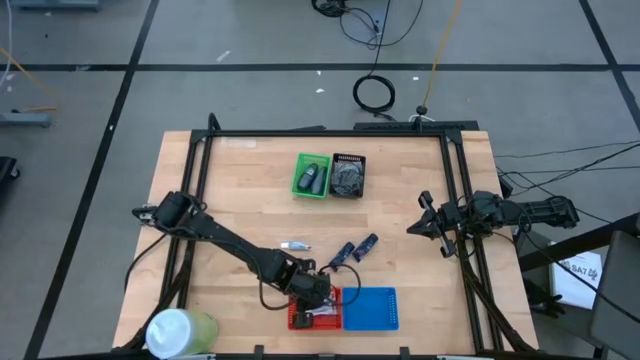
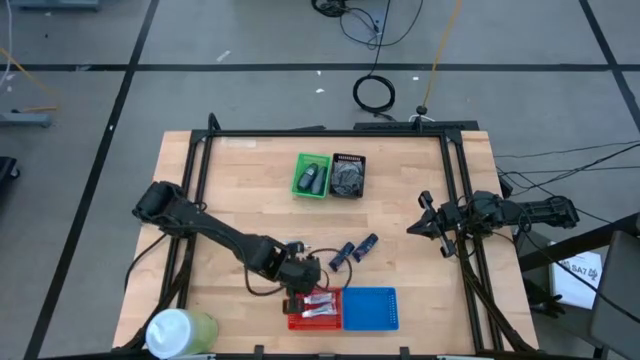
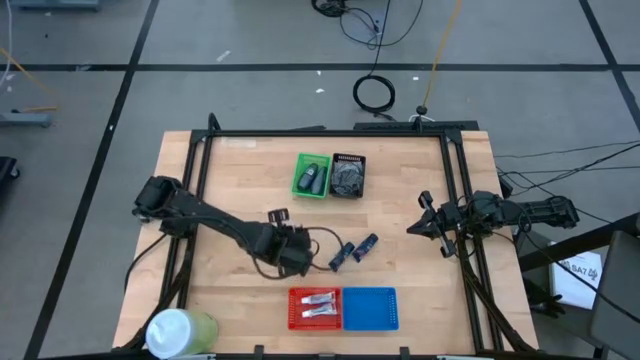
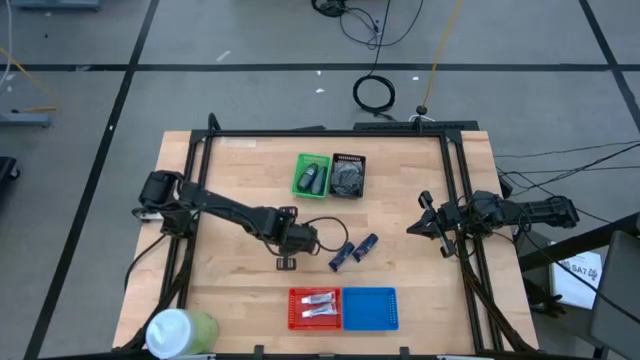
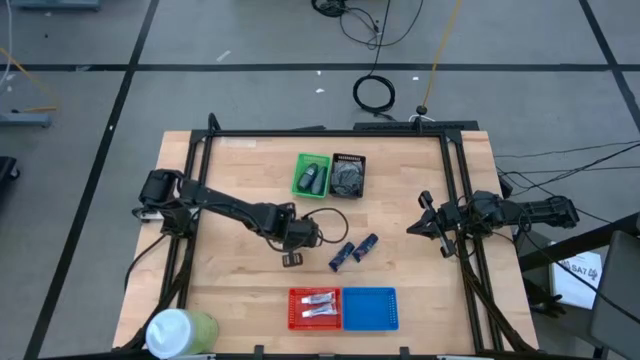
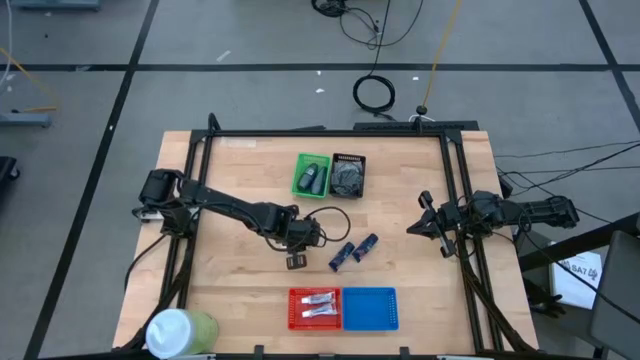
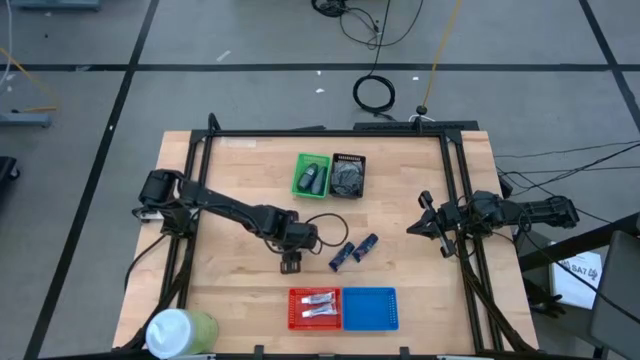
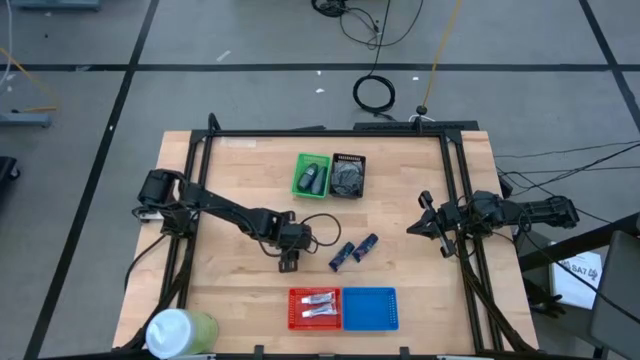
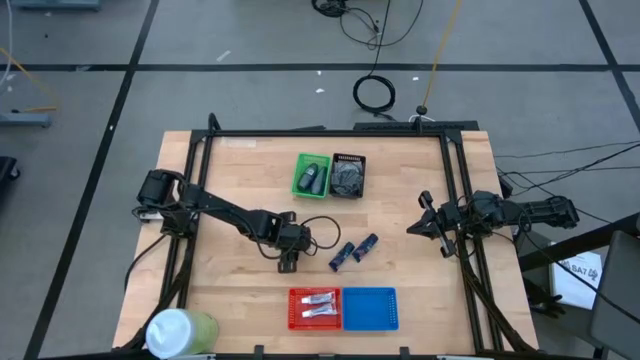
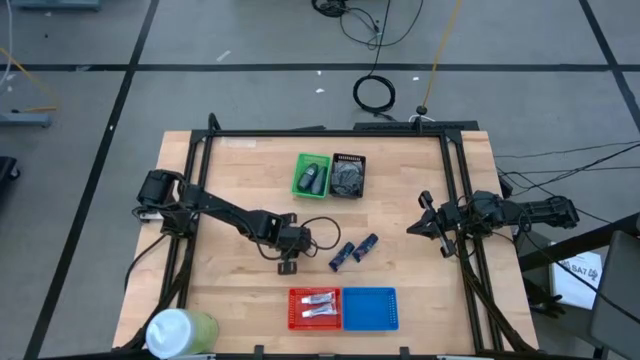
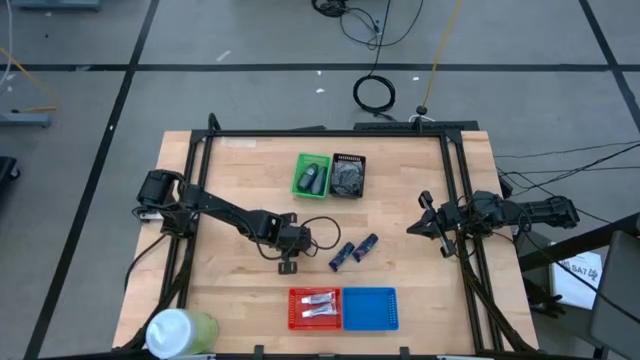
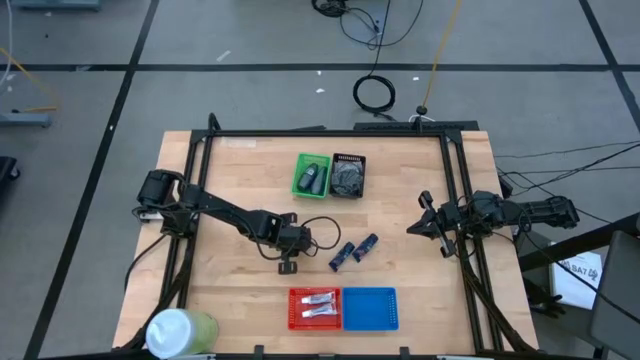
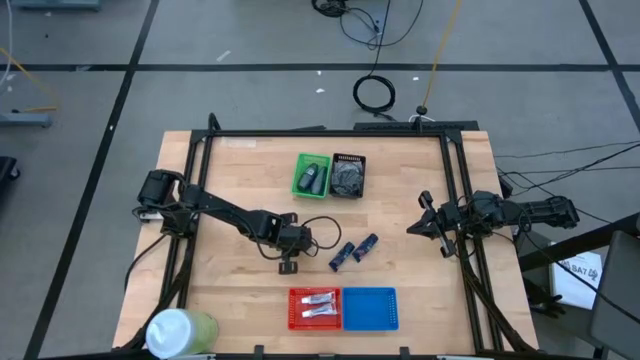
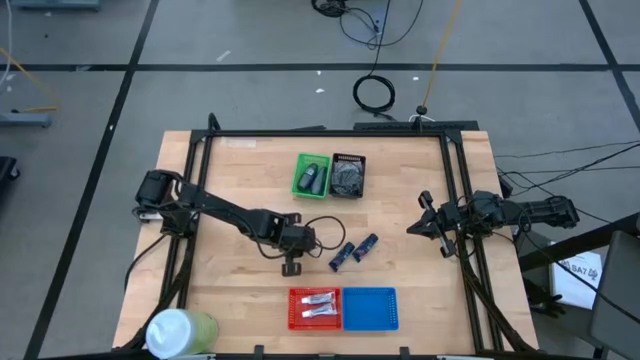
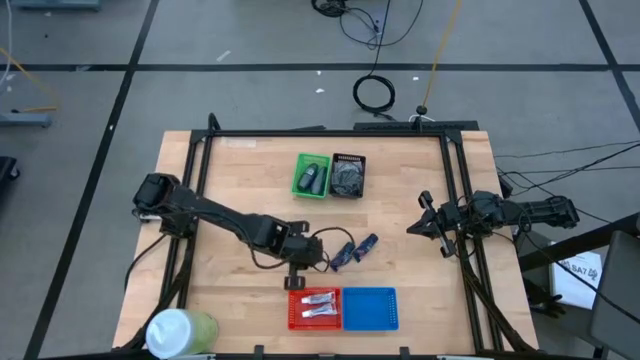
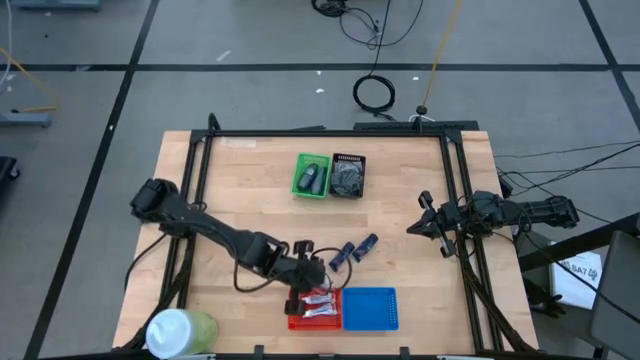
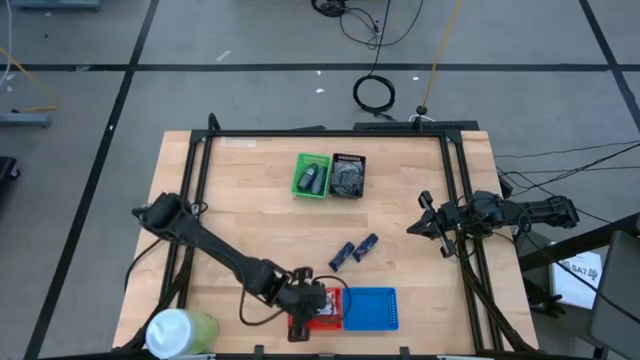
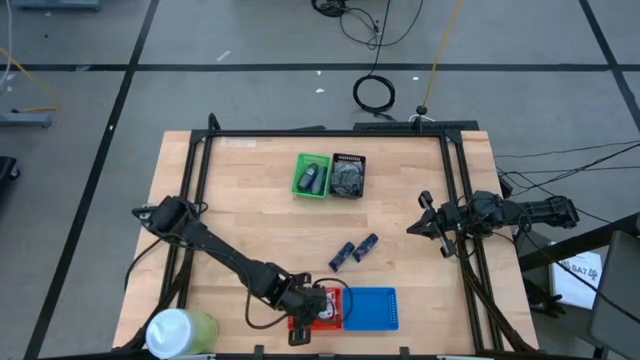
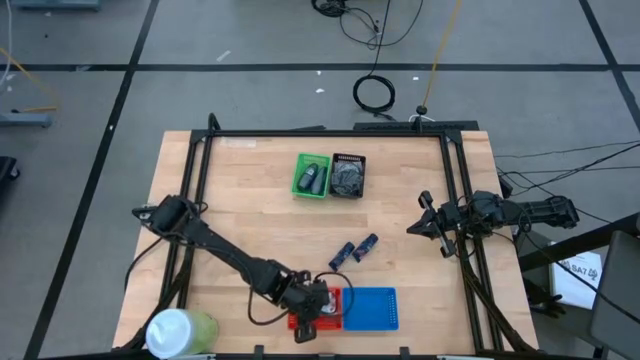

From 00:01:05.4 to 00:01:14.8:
Task: Pick & Place Travel size toiletries
Put the toothpaste into the red bin

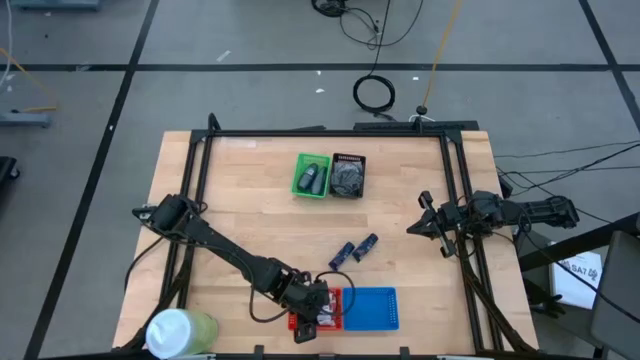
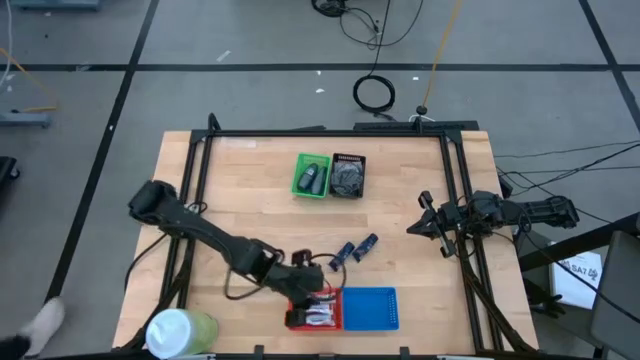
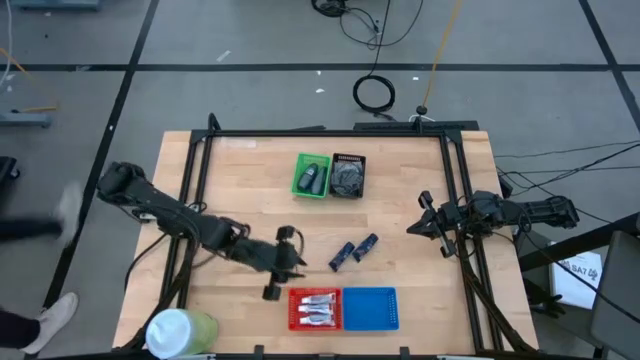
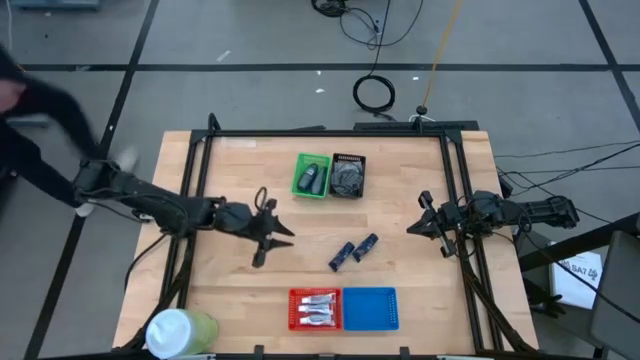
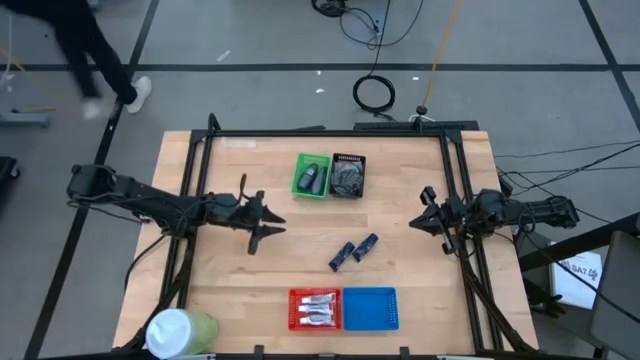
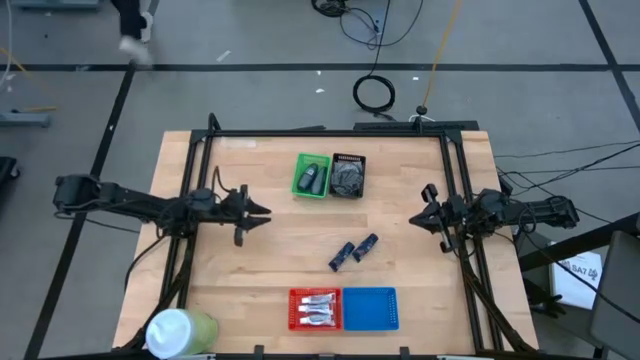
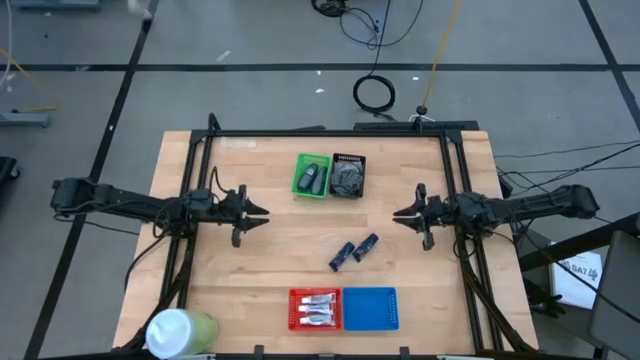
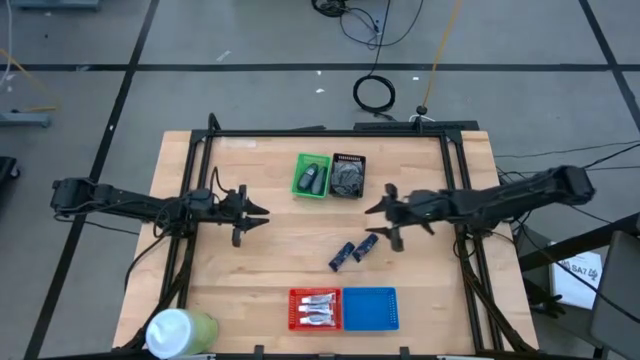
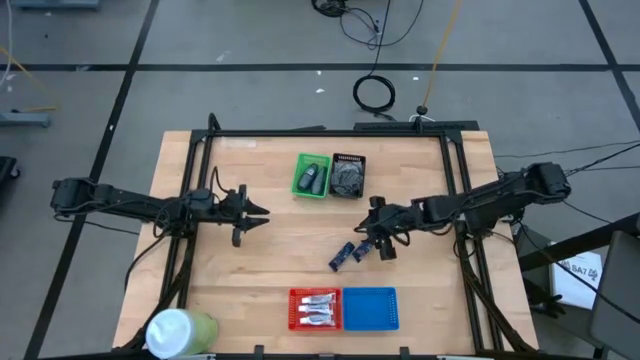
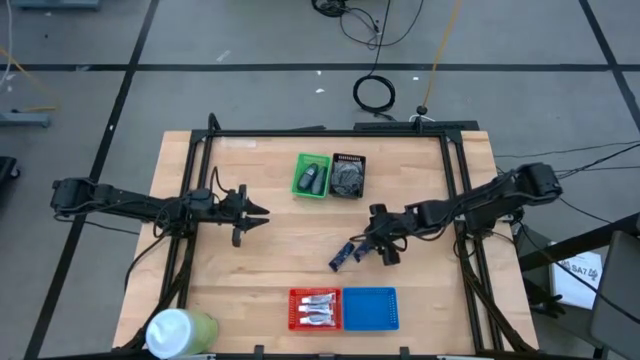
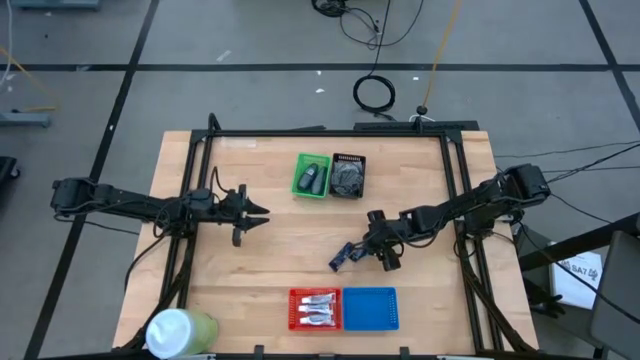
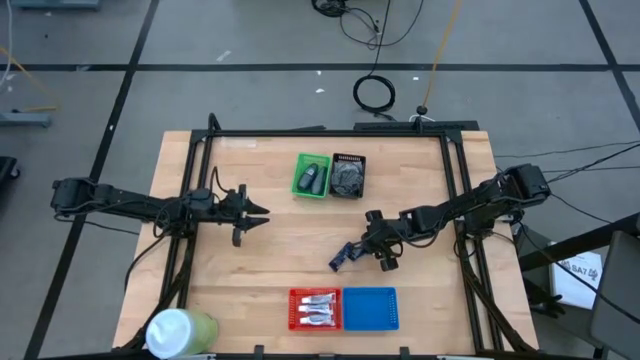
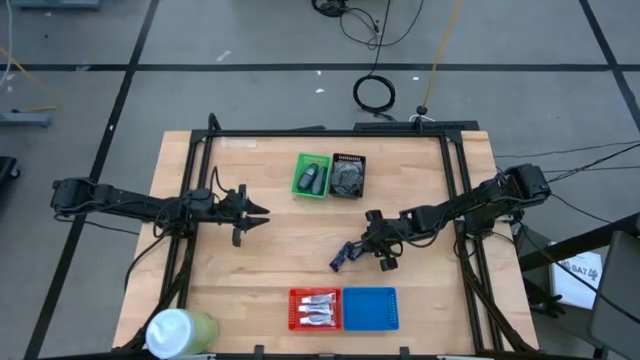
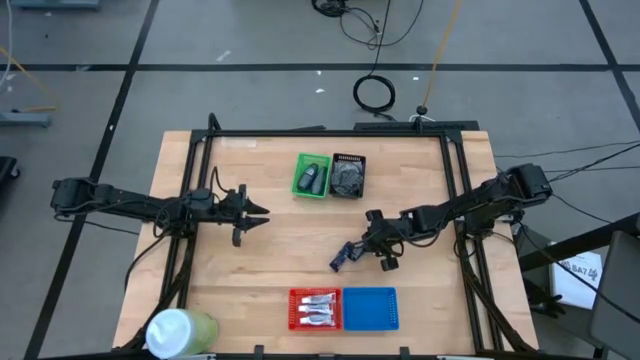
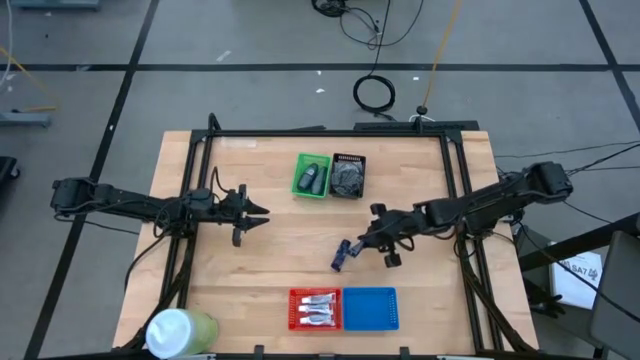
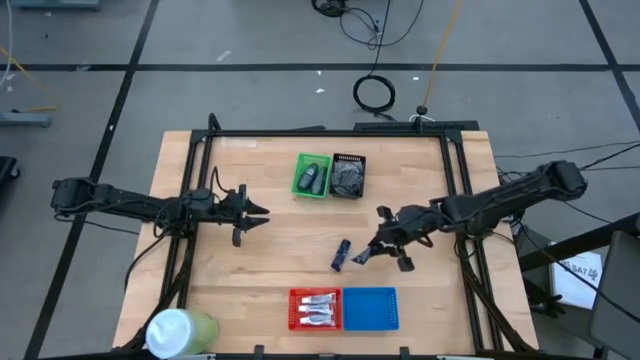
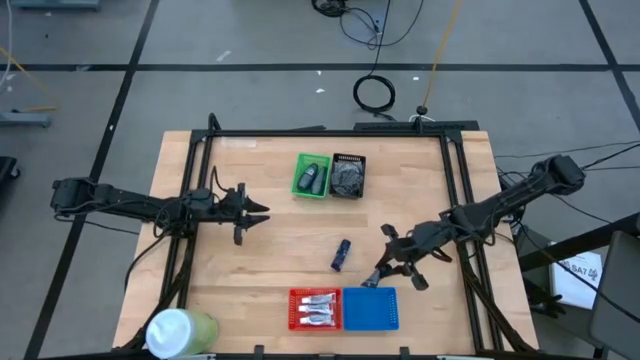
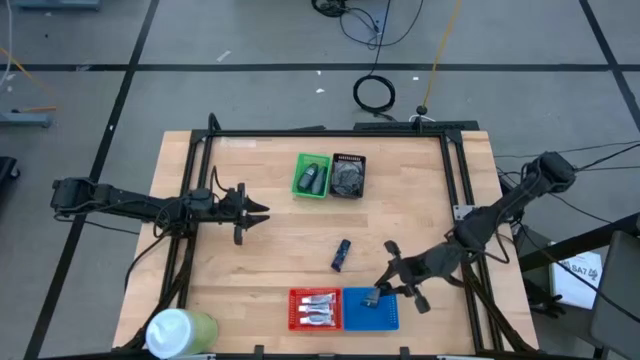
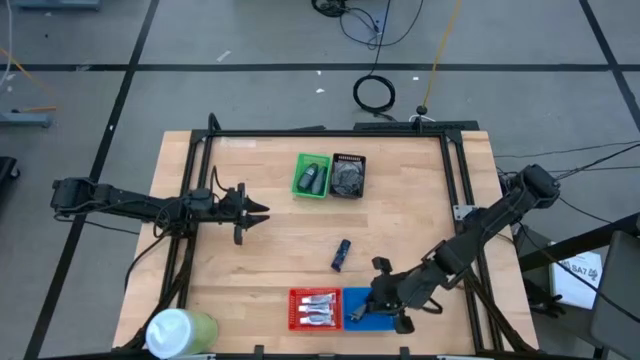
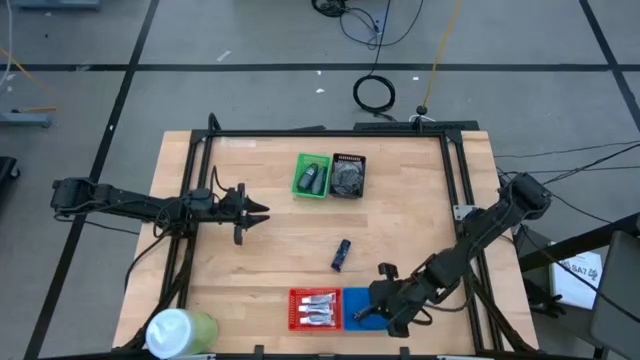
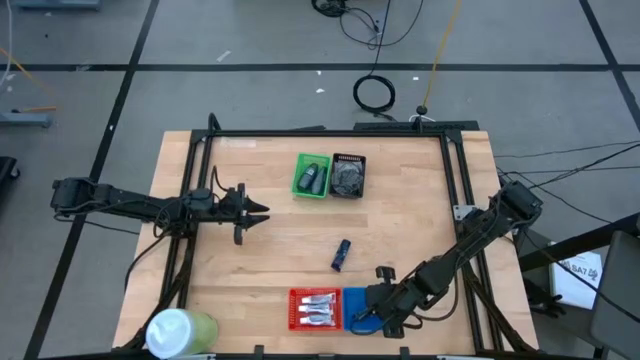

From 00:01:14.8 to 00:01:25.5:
Put the right shave cream into the blue bin
